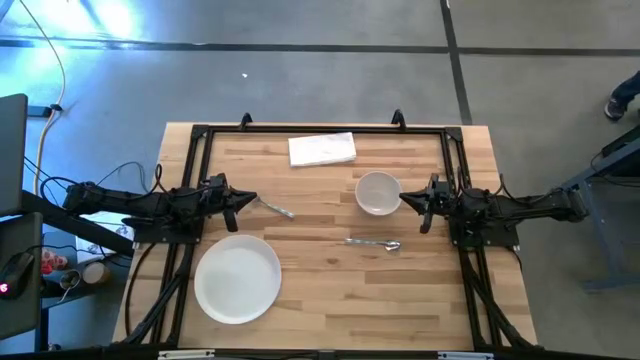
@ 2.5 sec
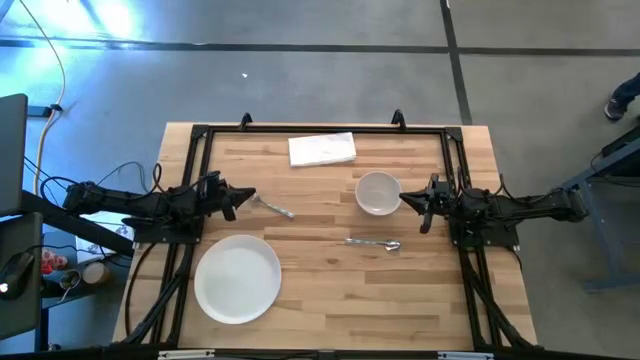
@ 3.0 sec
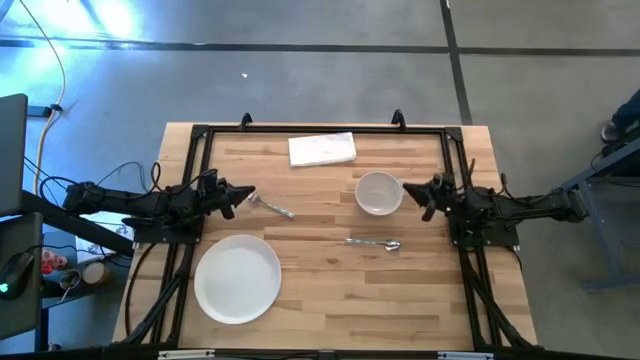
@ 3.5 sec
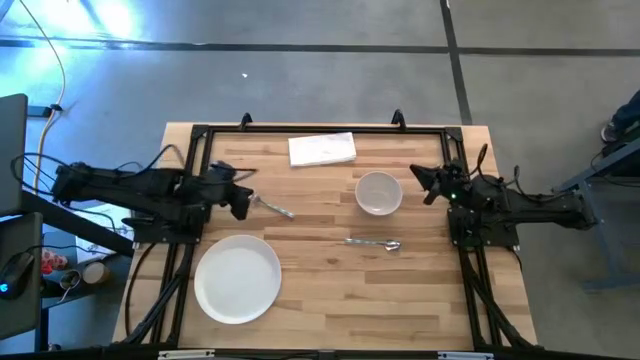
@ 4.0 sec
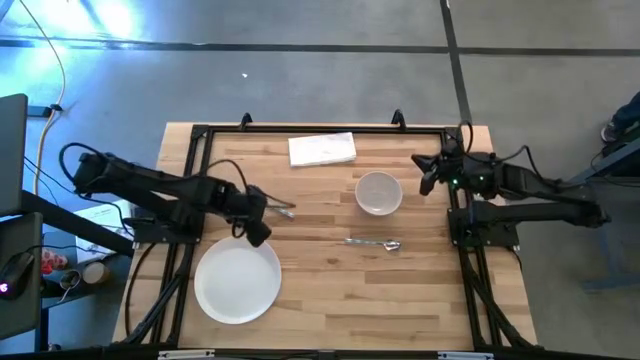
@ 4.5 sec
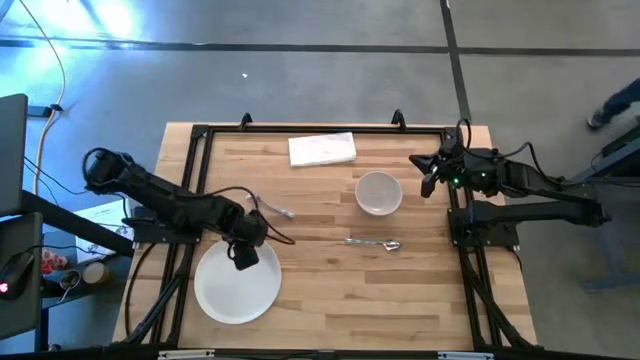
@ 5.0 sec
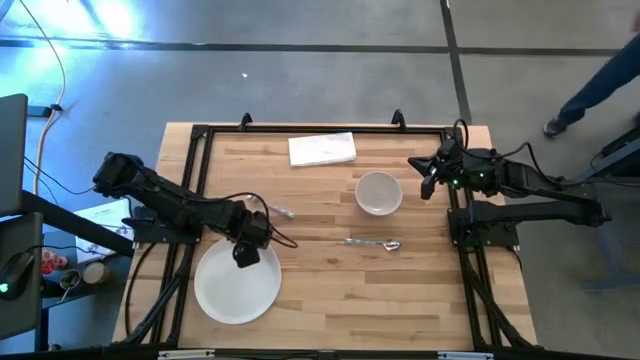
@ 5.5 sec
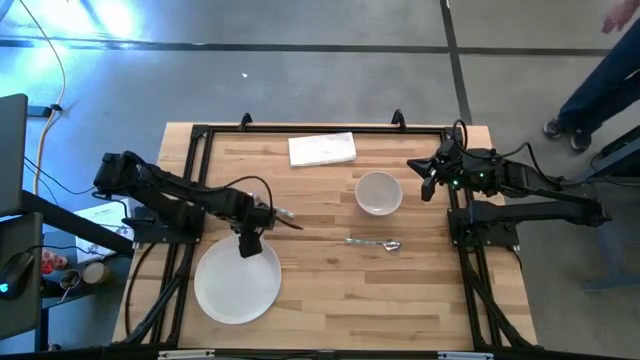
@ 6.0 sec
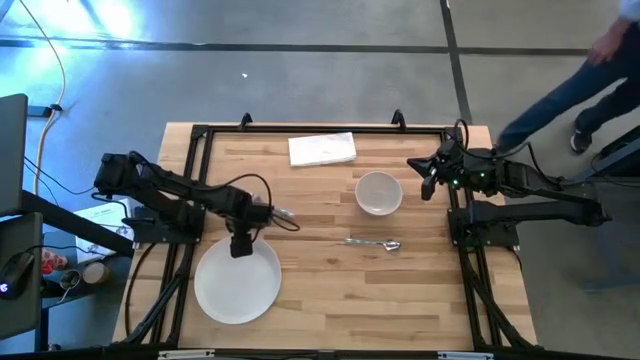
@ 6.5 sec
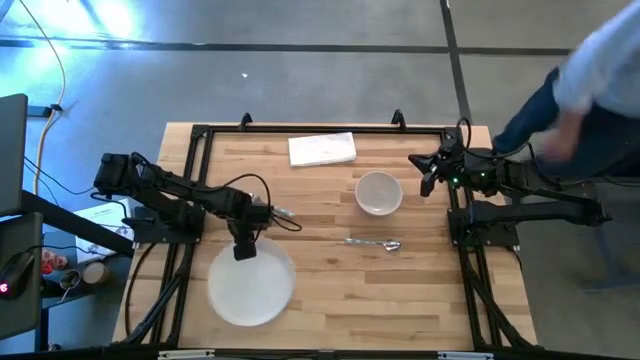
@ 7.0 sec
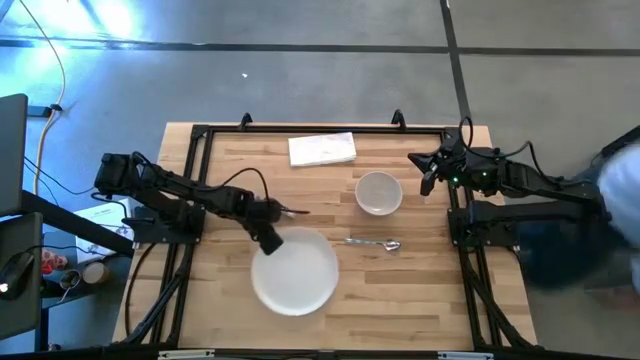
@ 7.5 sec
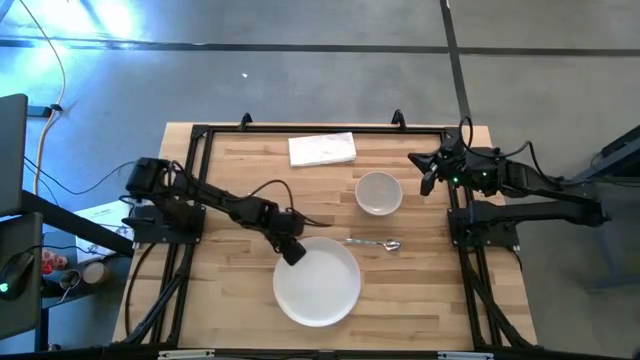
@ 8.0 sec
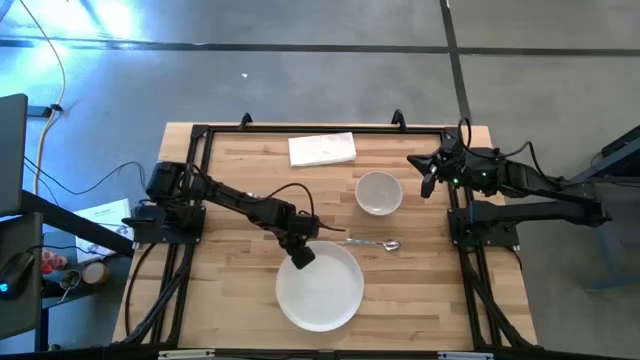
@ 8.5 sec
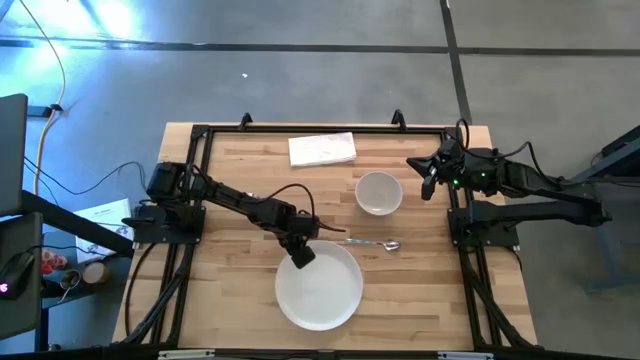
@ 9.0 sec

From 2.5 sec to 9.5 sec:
Task: Set table place
Move the white plate to the bottom middle of the table

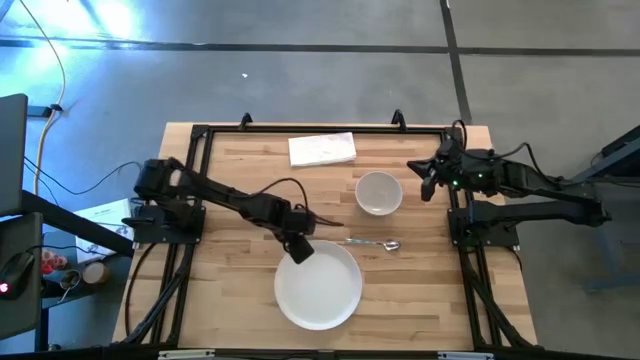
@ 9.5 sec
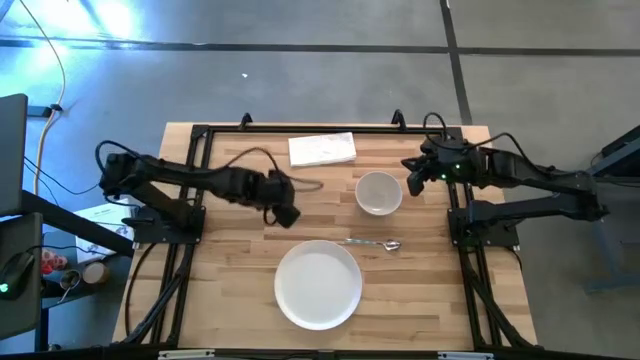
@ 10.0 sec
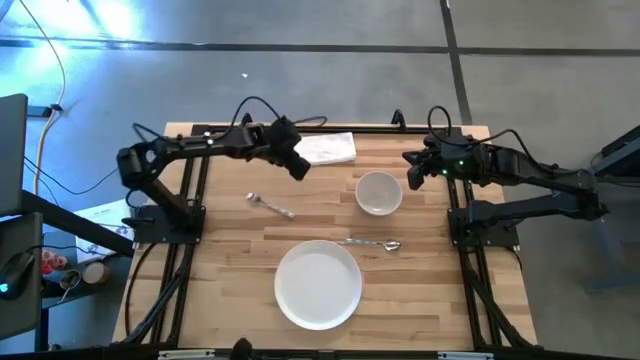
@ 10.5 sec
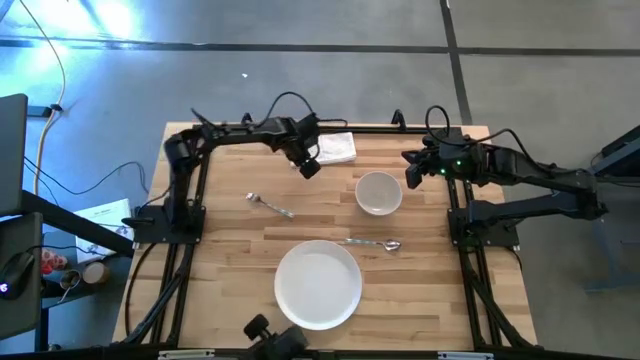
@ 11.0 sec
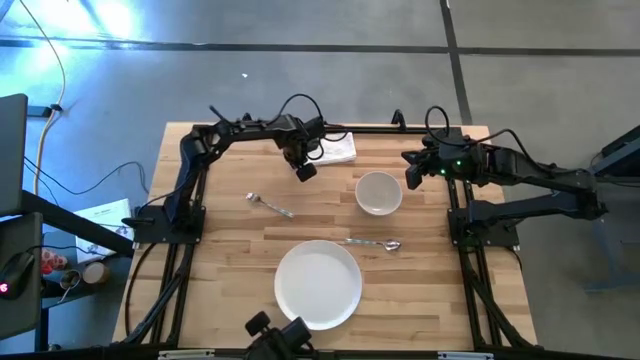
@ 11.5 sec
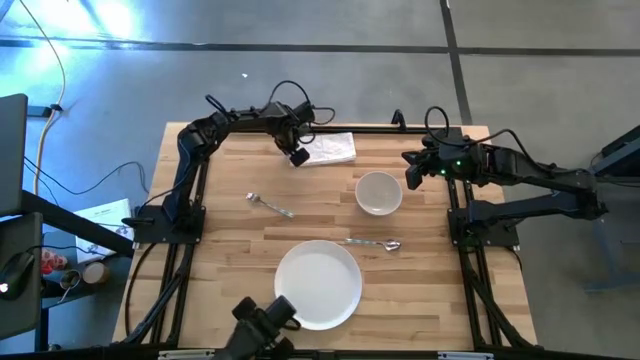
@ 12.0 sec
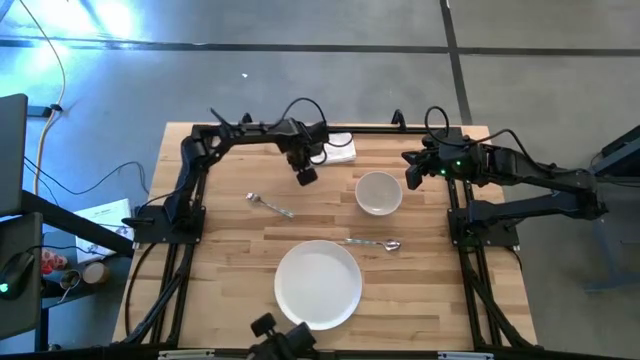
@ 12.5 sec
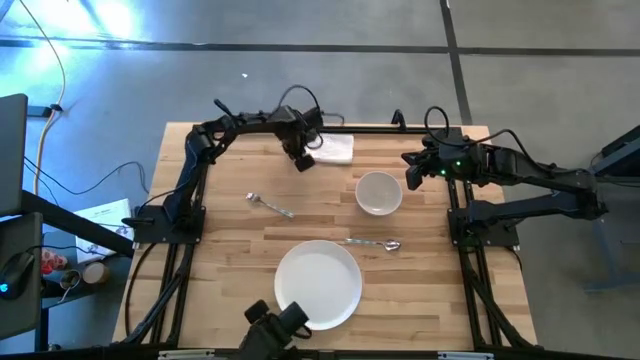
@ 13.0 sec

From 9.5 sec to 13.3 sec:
Adjust the white napkin

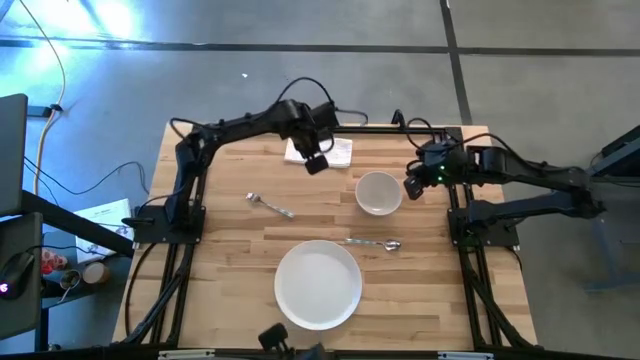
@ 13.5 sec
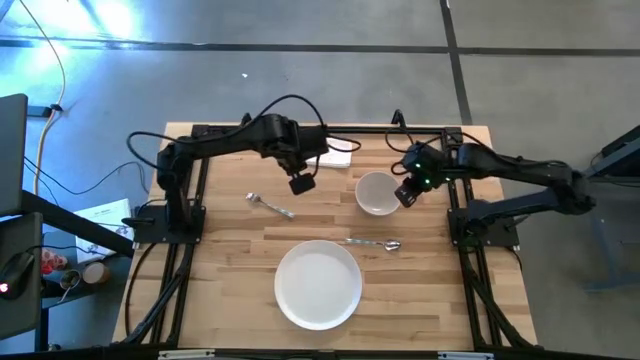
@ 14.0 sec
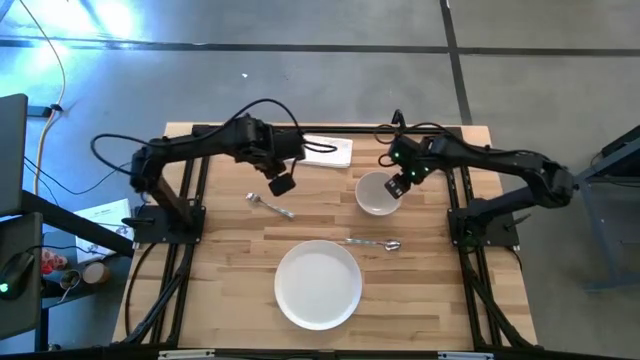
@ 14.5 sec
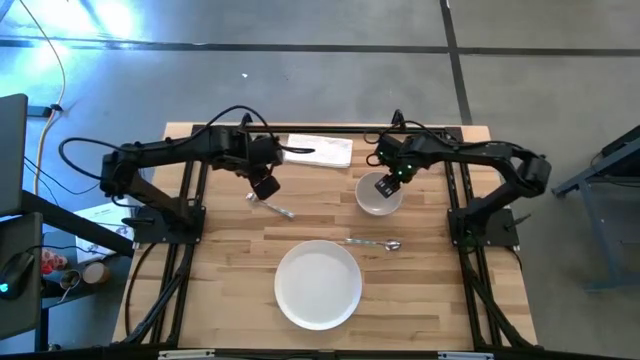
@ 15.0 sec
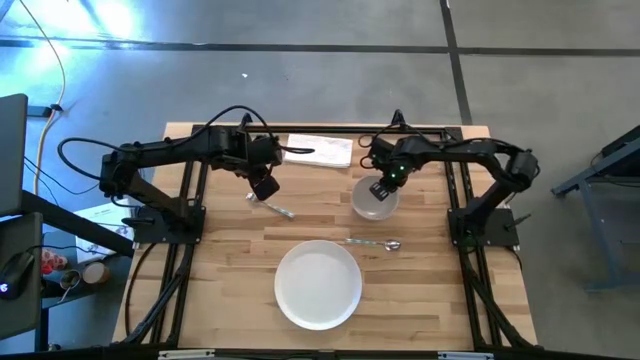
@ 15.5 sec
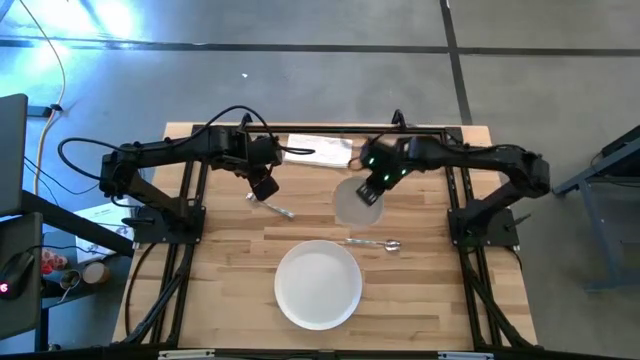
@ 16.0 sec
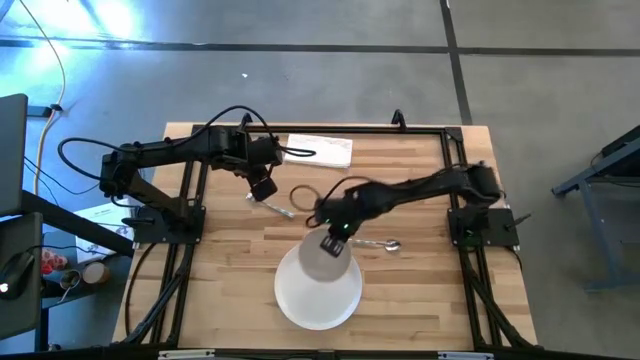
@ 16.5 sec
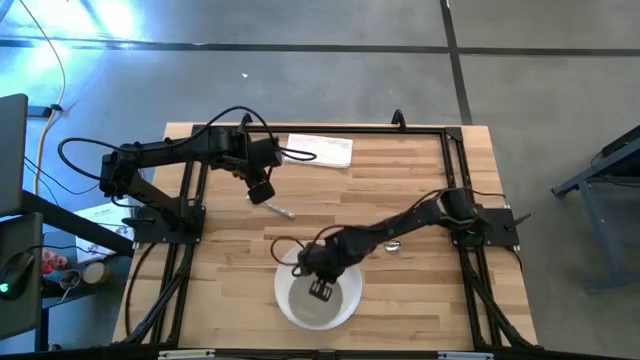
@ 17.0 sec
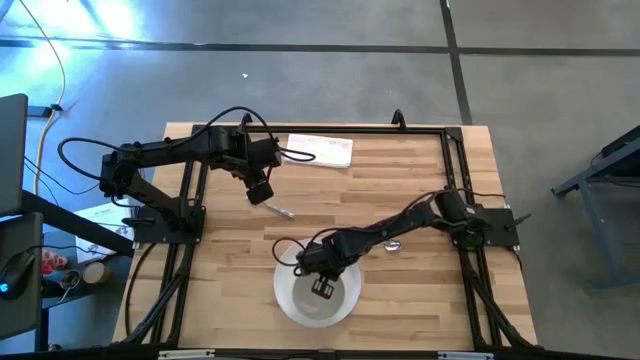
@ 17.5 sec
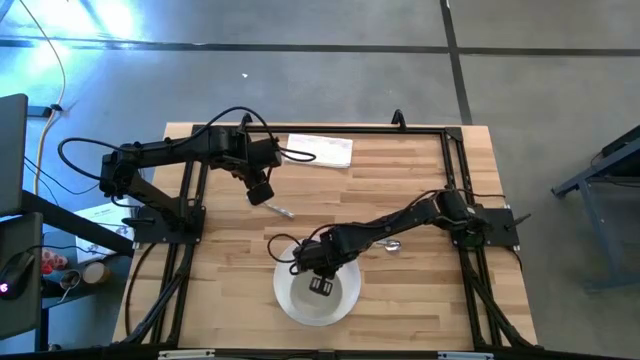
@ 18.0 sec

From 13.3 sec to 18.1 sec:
Put the white bowl on the white plate

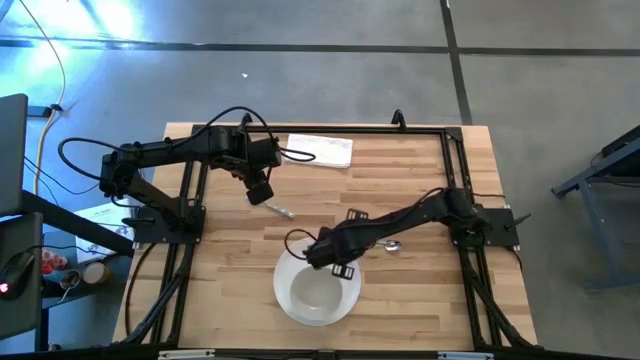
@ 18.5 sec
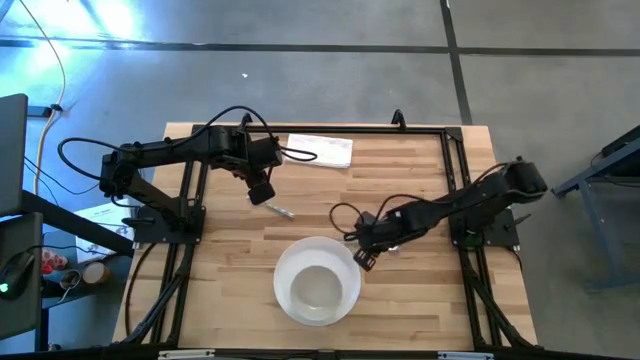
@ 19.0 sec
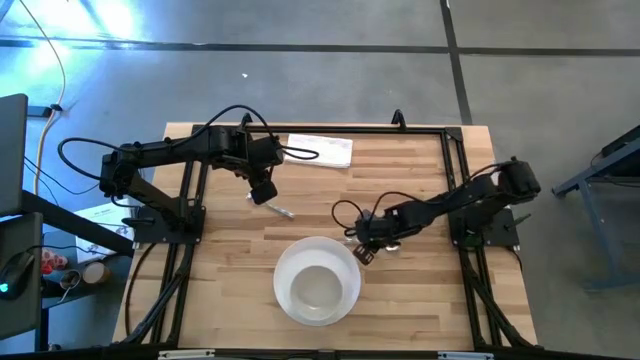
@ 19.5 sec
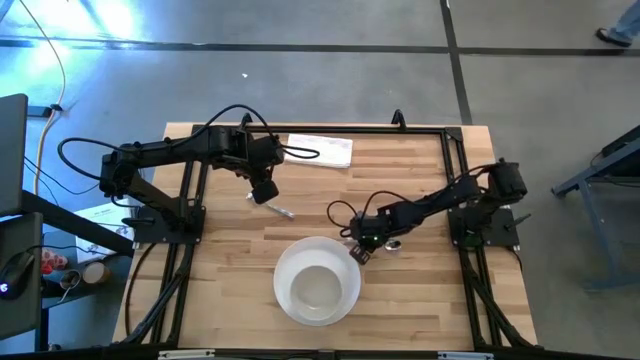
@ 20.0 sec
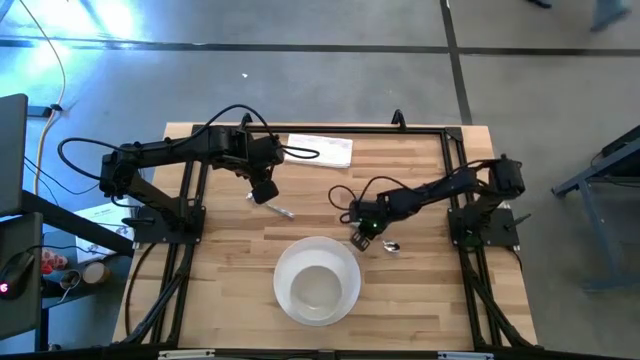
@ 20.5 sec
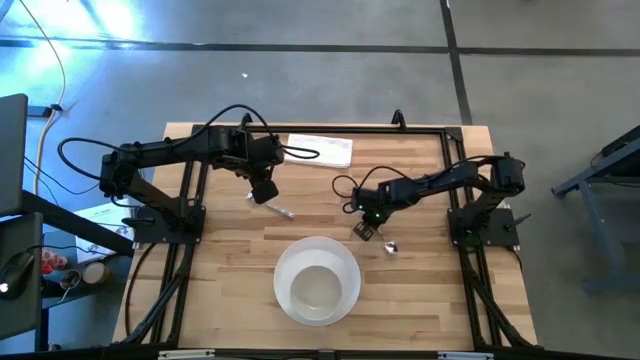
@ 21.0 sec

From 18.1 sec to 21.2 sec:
Adjust the blue spoon

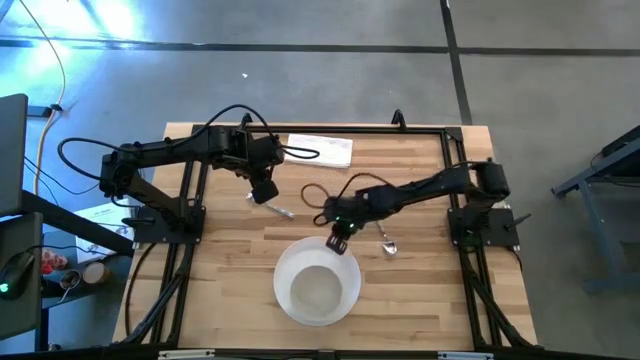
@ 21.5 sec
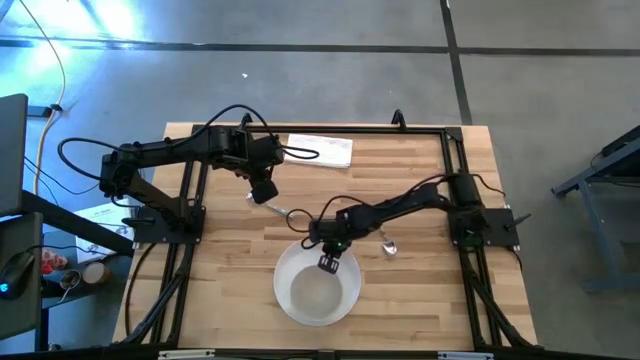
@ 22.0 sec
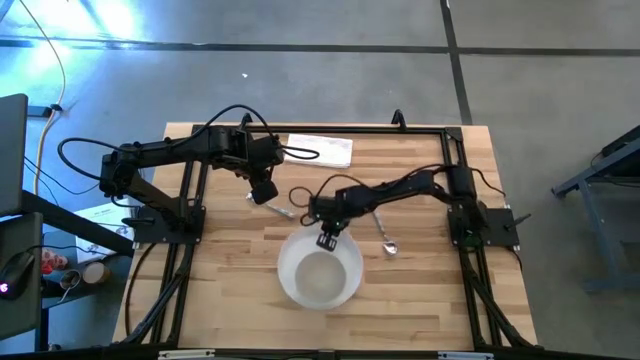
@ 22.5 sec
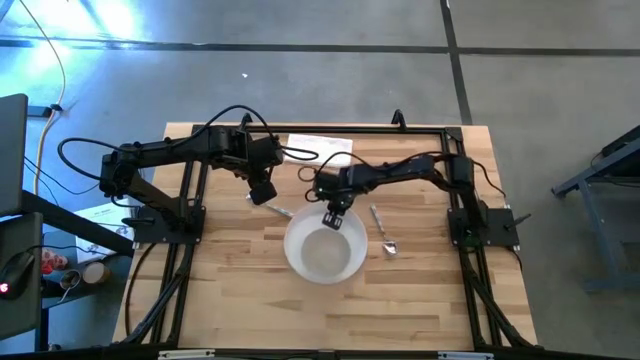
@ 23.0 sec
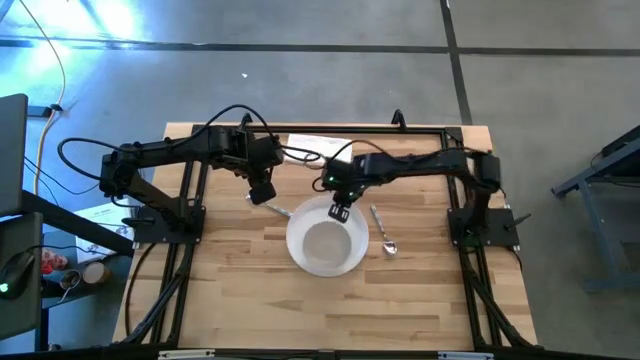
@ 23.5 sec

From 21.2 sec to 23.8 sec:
Move the white plate to the center of the table
